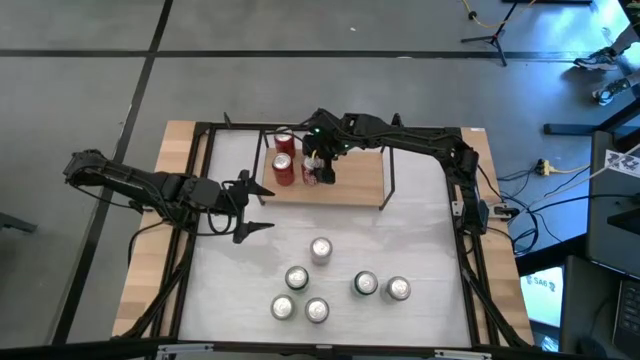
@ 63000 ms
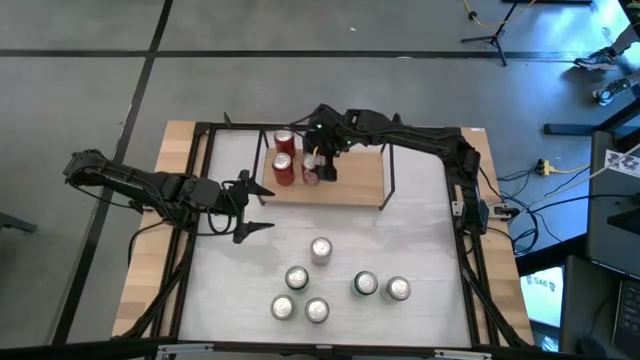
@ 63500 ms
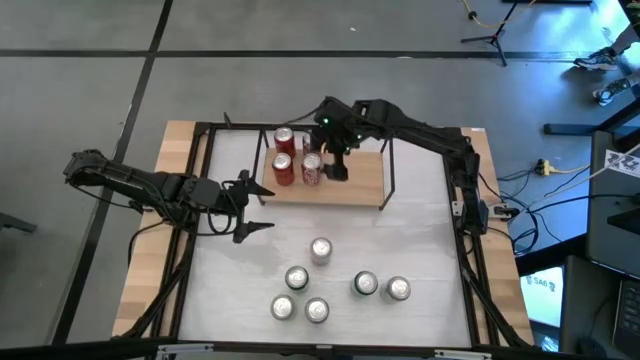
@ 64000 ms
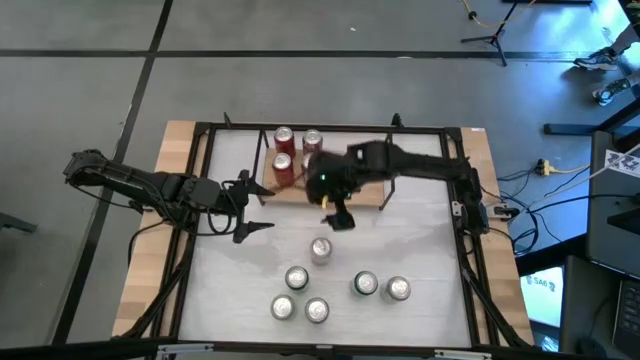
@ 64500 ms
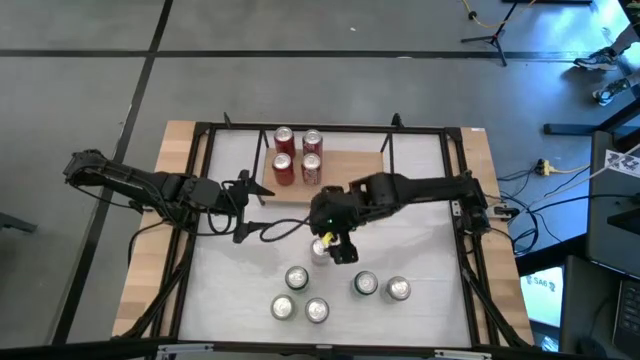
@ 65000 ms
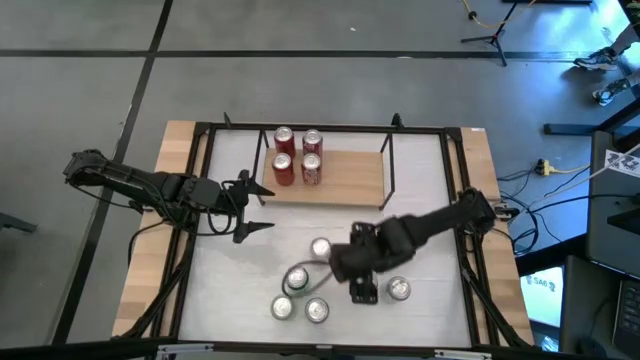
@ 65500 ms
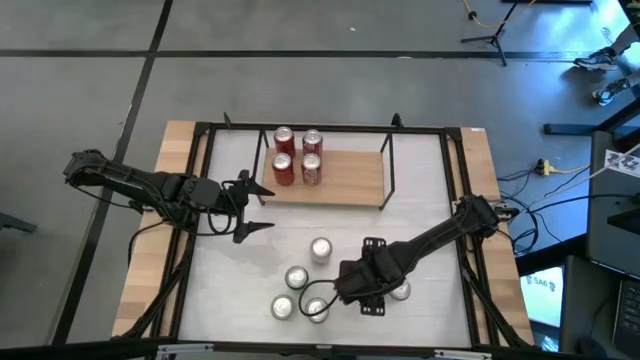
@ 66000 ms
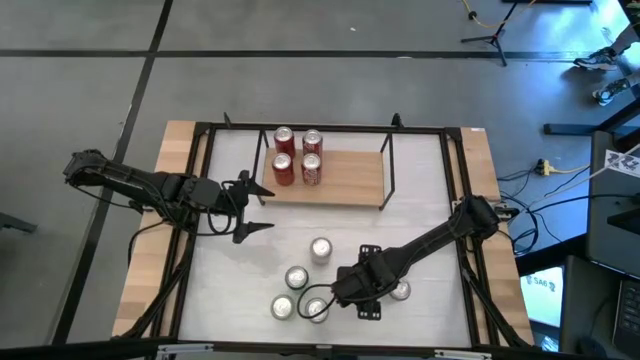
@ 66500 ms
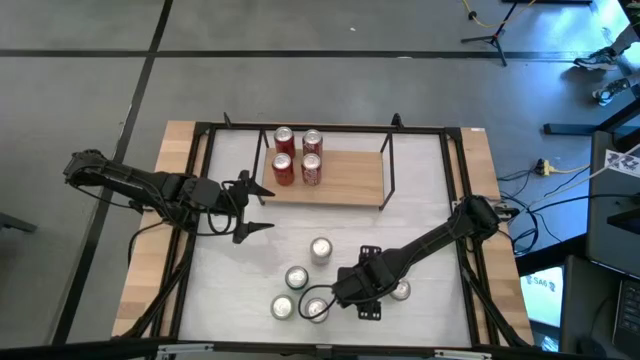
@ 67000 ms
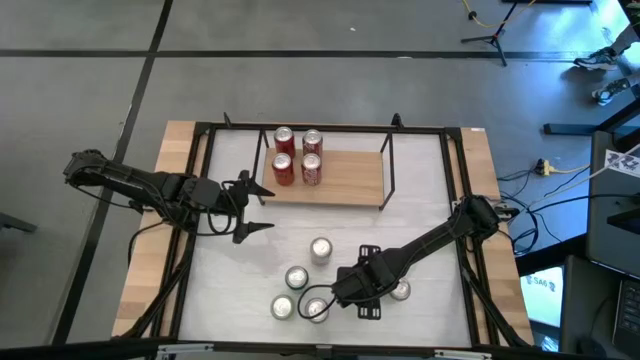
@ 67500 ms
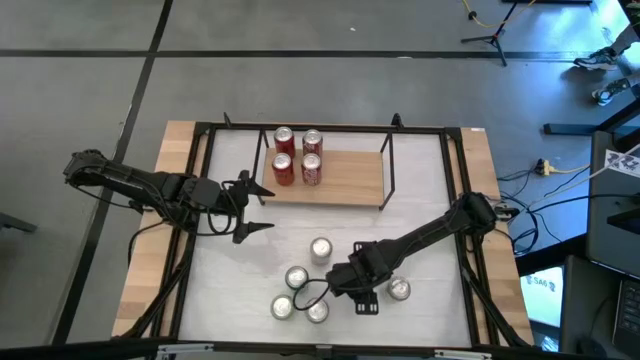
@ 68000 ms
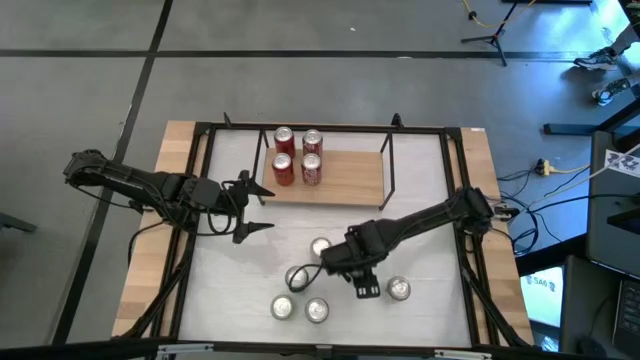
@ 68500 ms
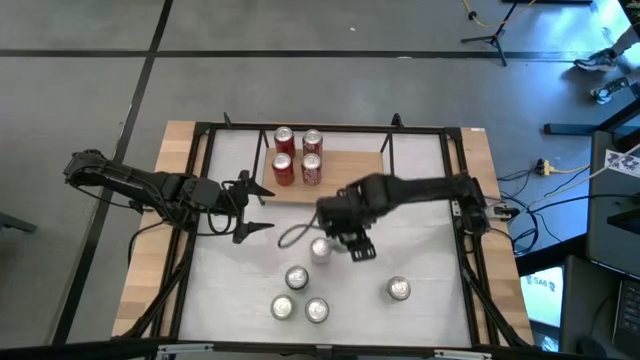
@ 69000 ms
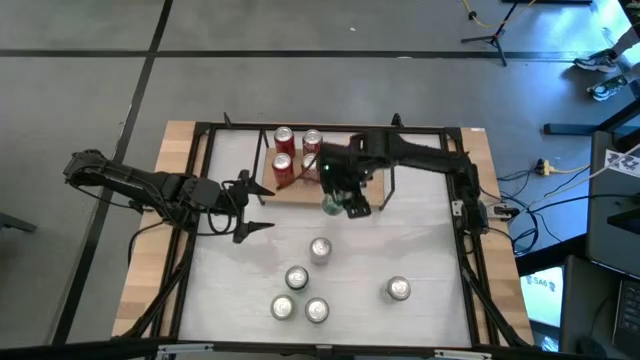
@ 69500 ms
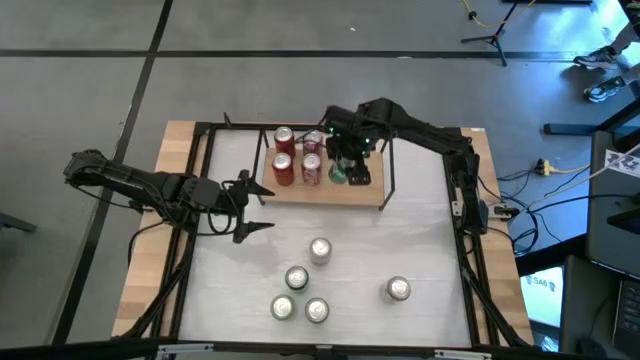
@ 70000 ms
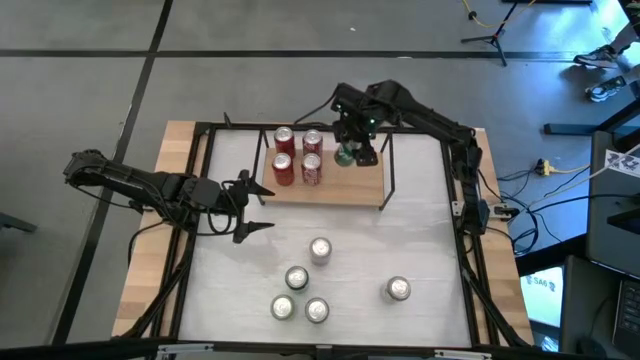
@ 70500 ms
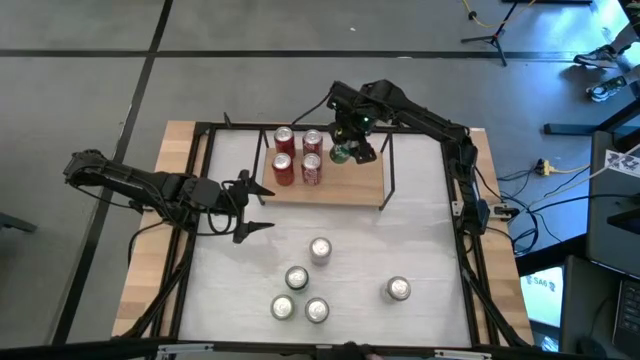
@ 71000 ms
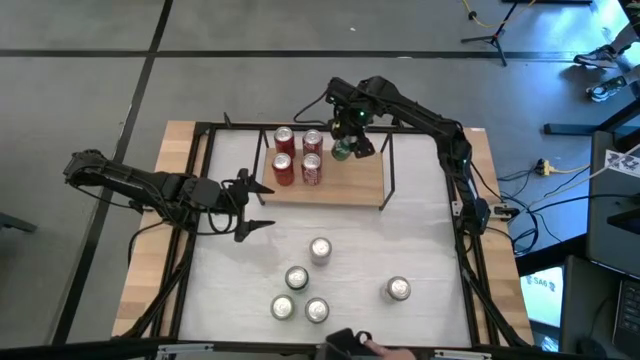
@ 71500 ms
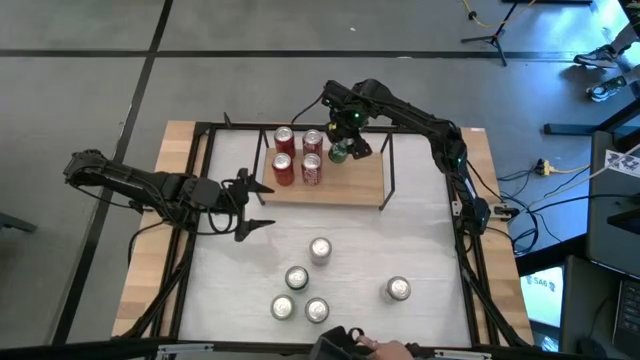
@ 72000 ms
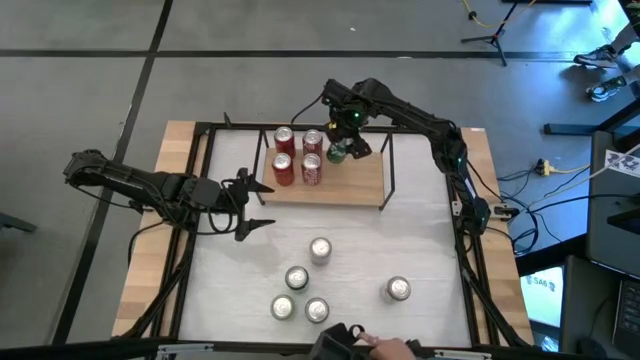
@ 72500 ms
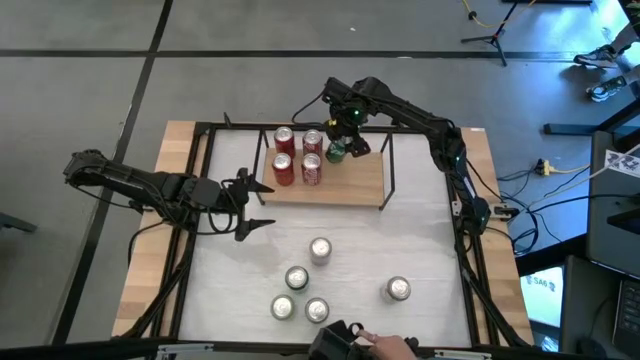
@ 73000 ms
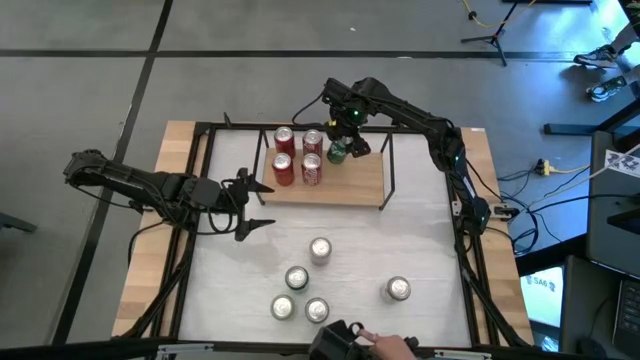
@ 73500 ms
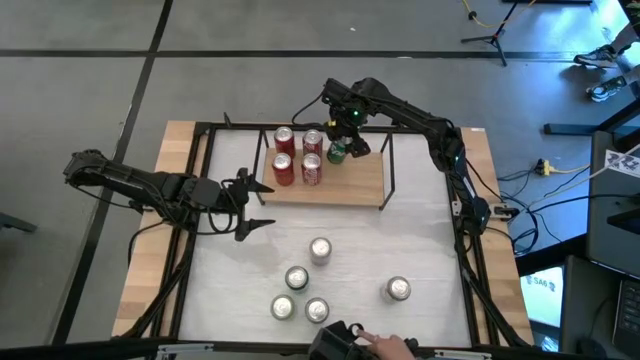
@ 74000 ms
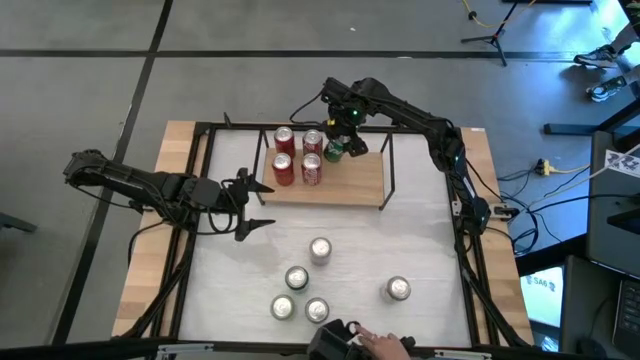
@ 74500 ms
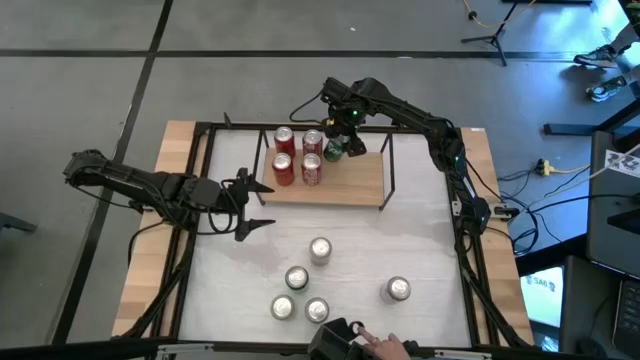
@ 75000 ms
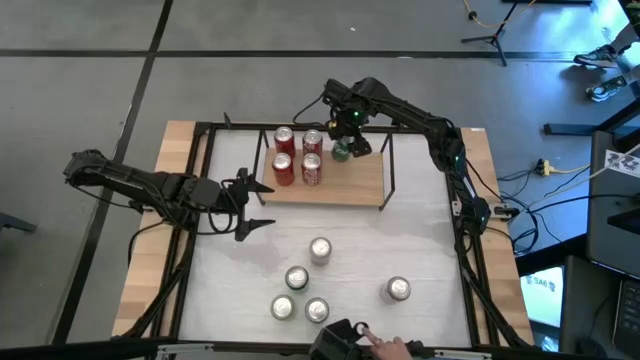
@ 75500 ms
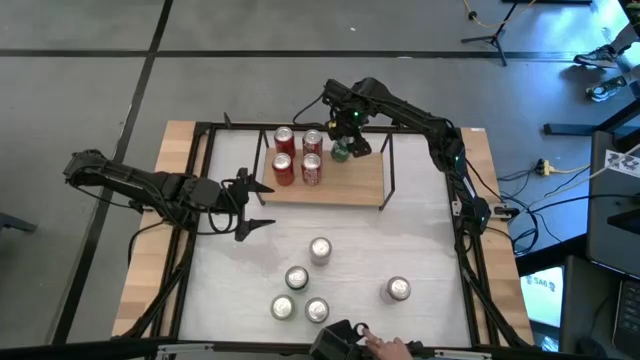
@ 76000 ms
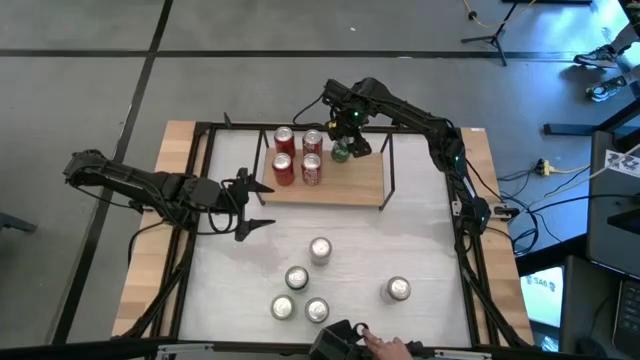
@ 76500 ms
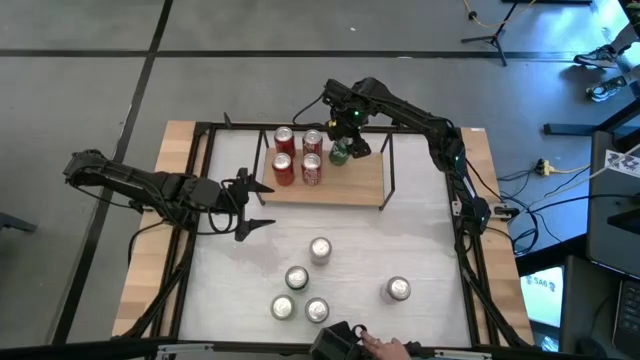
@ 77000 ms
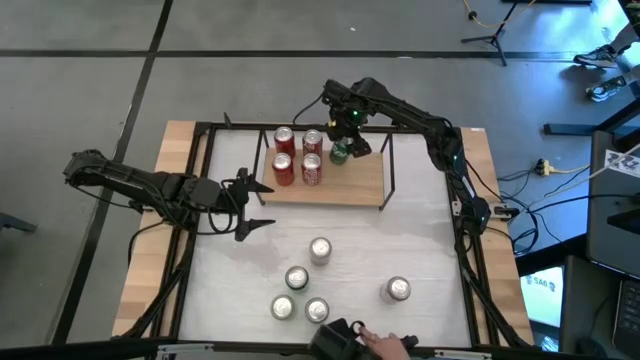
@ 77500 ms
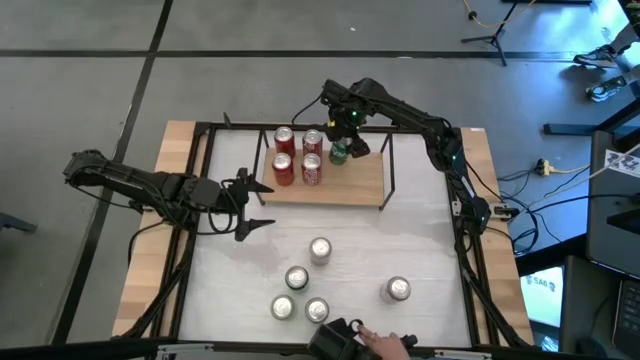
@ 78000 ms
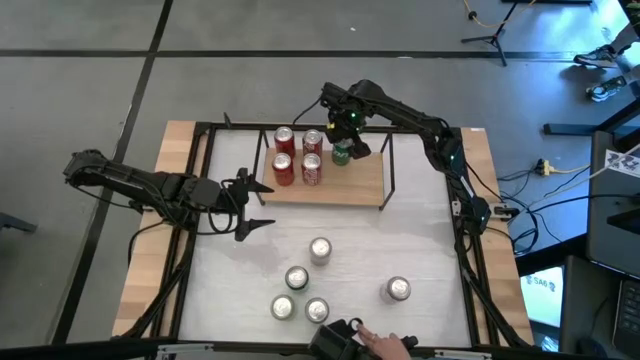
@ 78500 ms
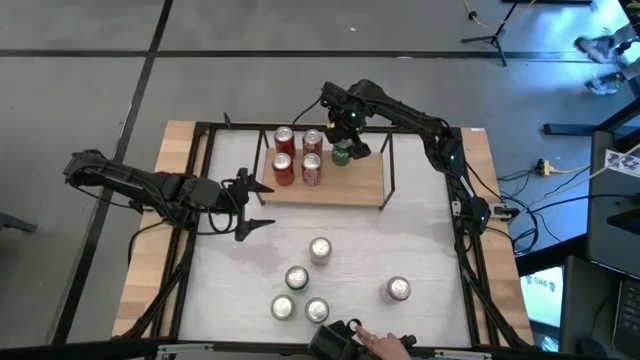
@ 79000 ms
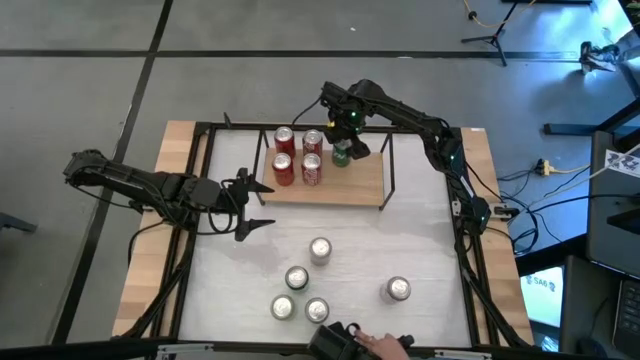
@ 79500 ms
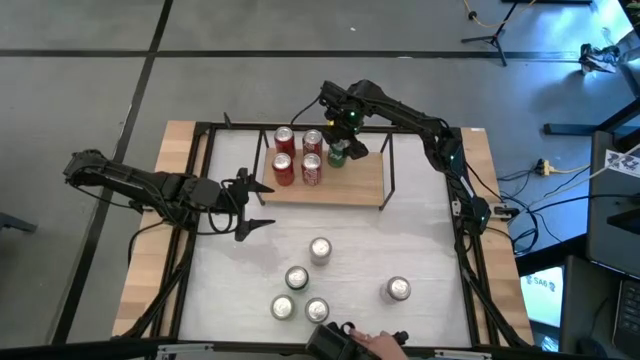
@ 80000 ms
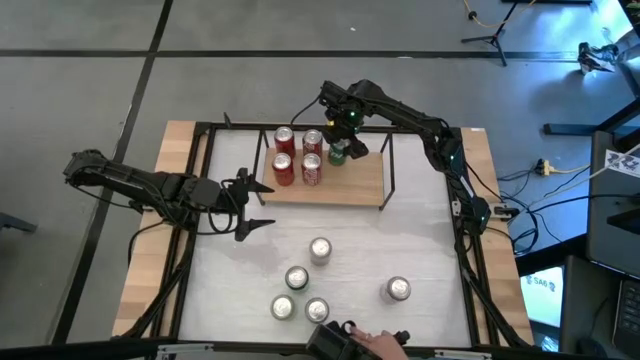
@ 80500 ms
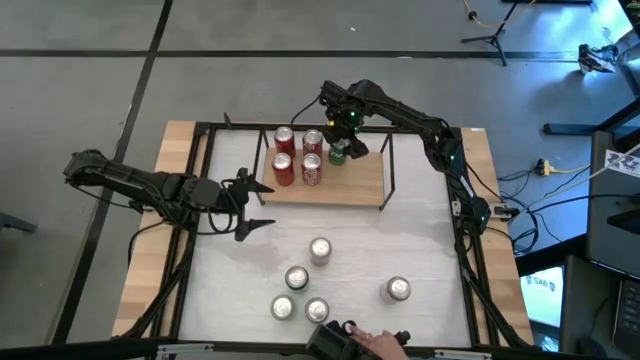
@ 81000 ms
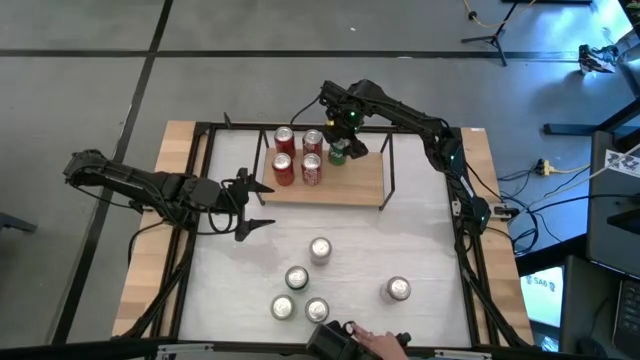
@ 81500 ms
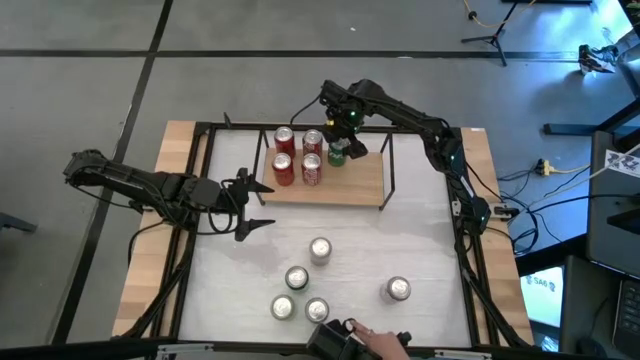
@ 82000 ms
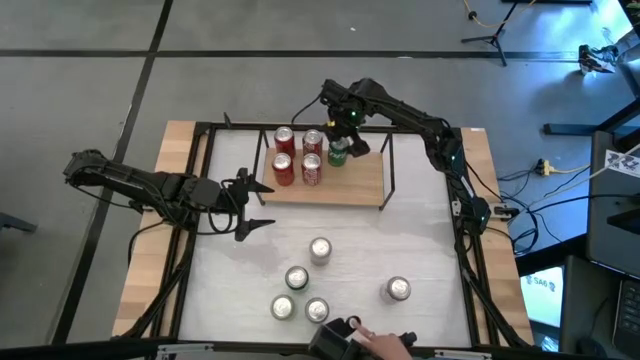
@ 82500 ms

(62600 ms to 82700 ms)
Task: Place canned beverage on shelf
Put the right green soda can on the shelf
